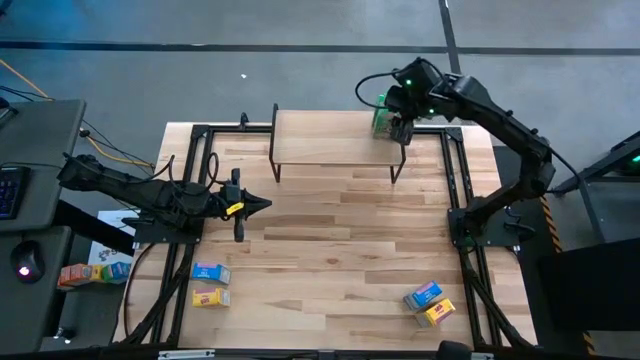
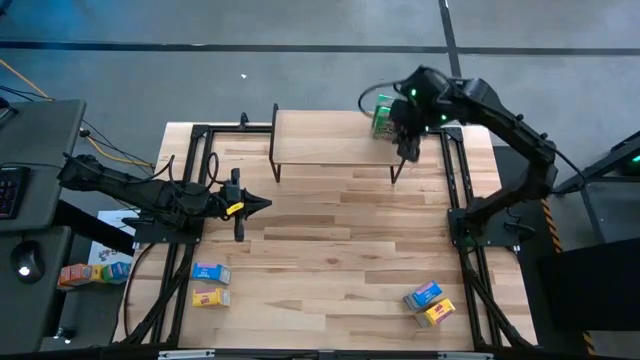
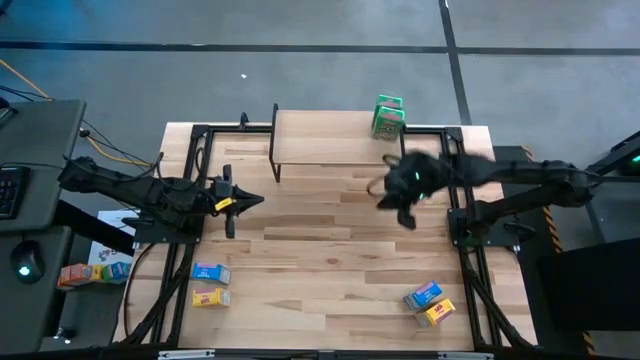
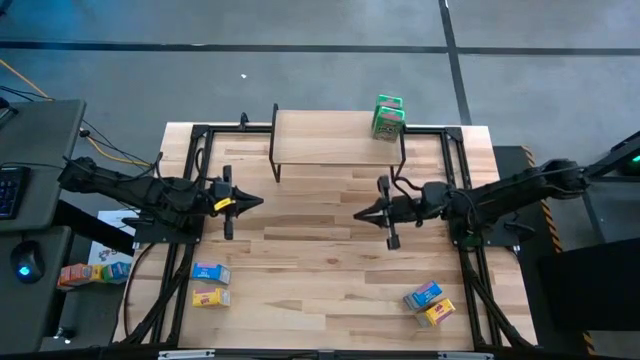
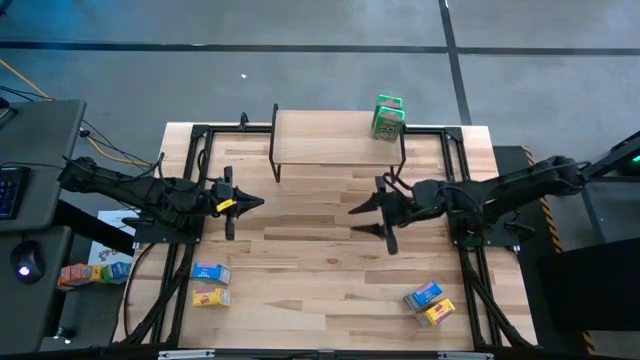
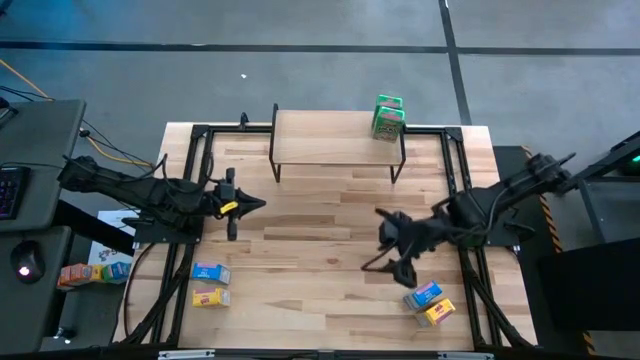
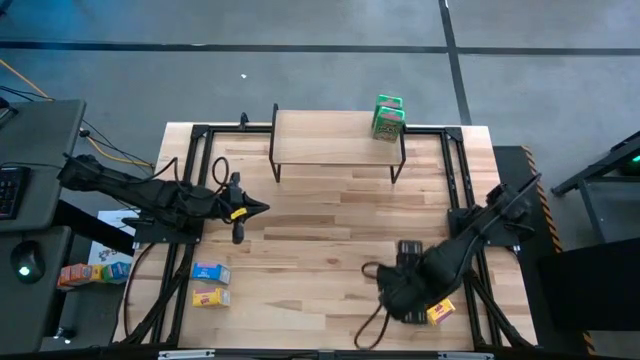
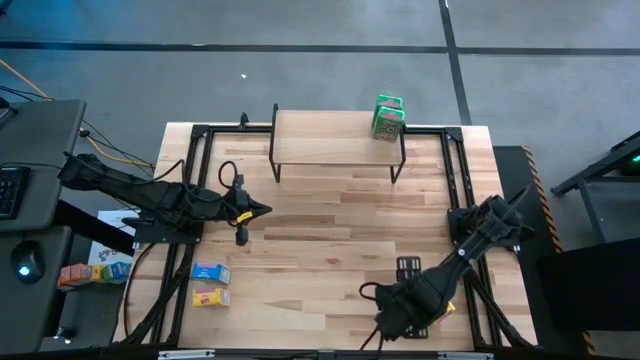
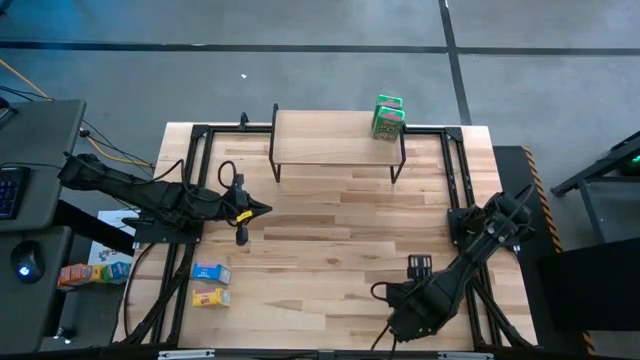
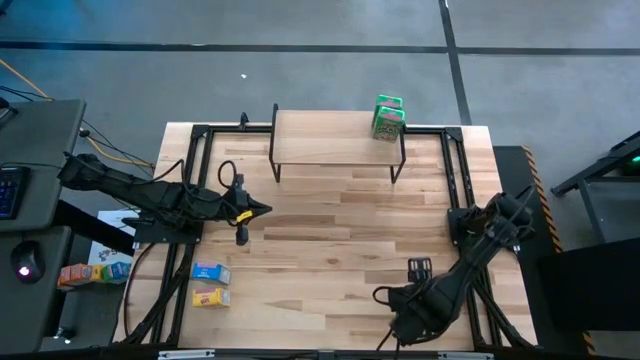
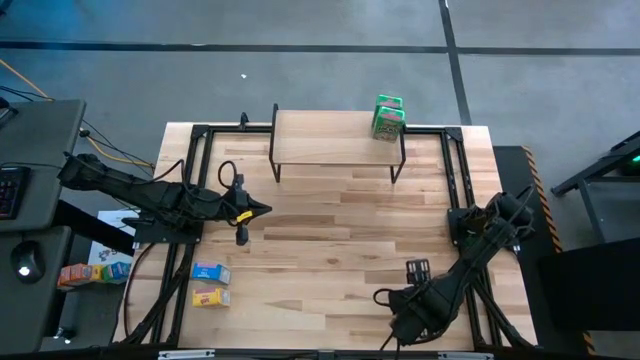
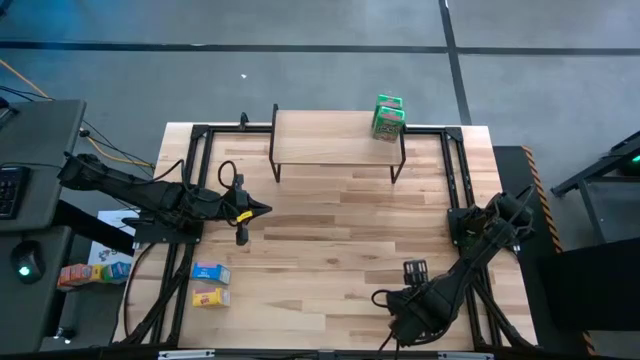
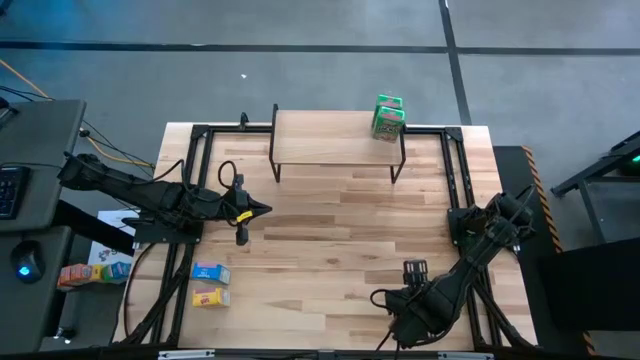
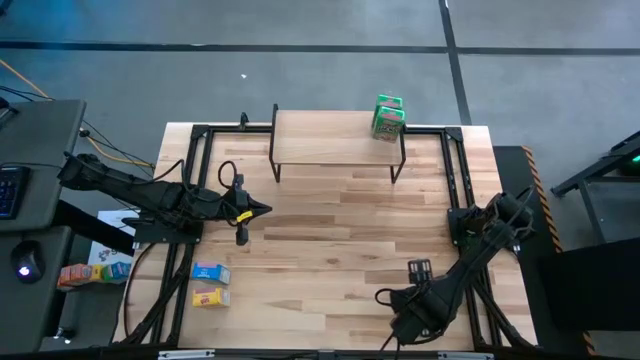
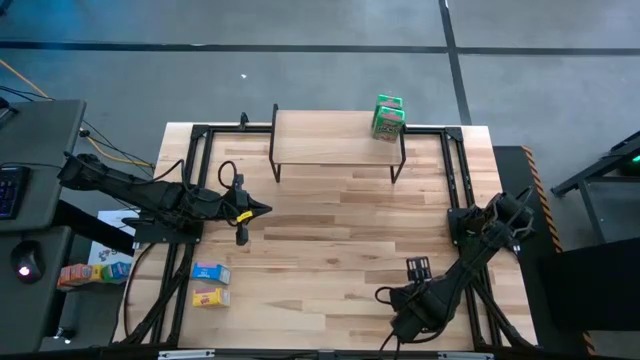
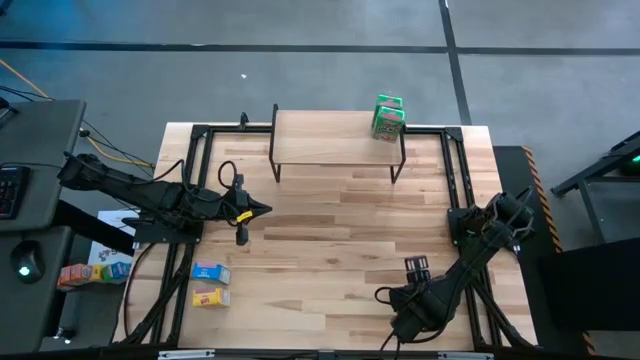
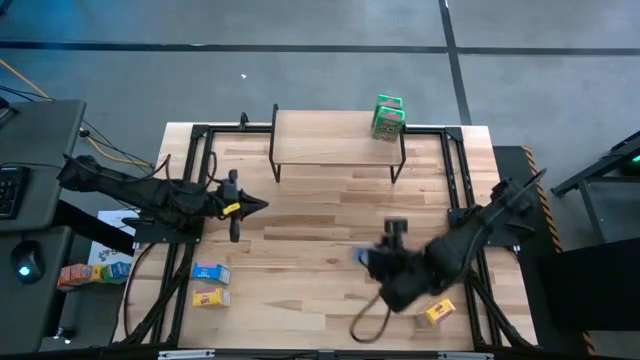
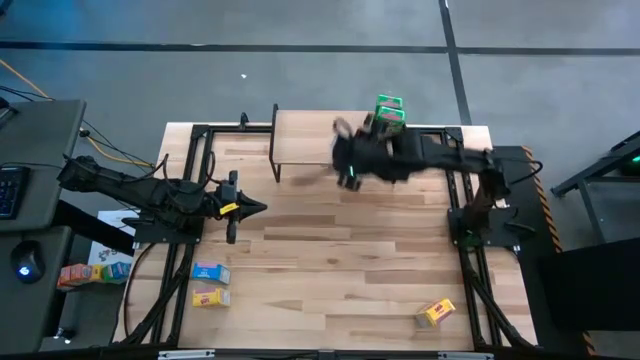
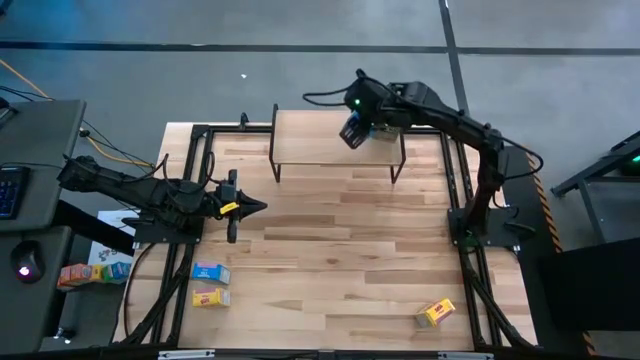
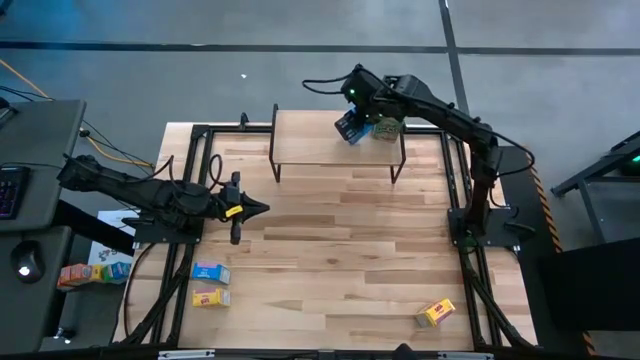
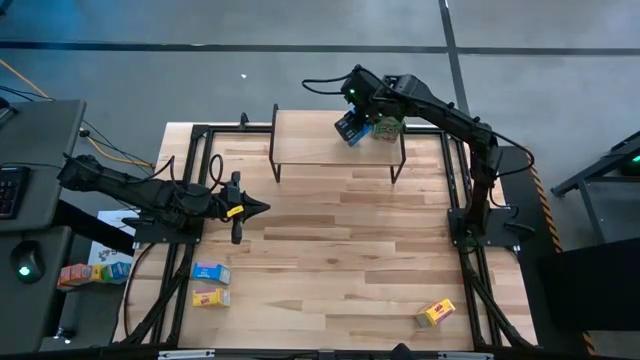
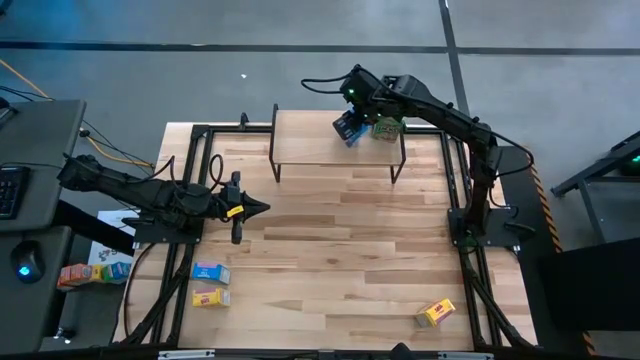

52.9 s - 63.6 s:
Task: Stack cereal on shelf
Put the right blue cereal box on the shelf

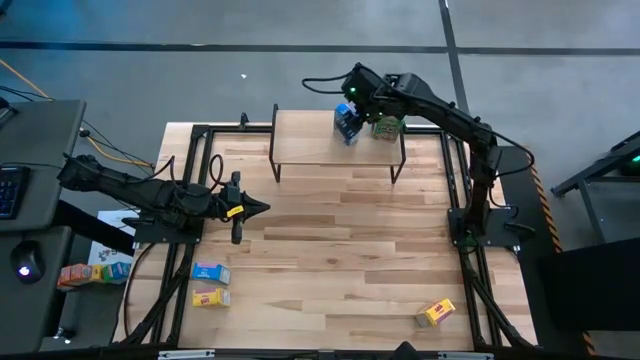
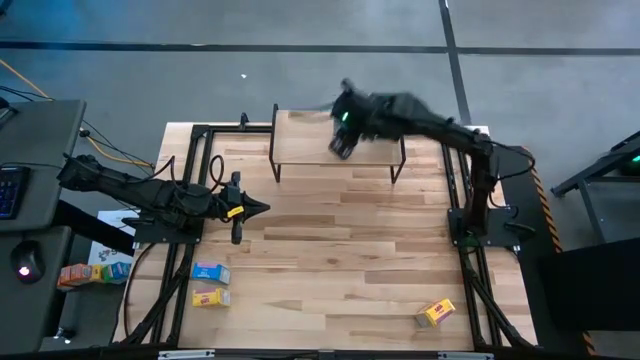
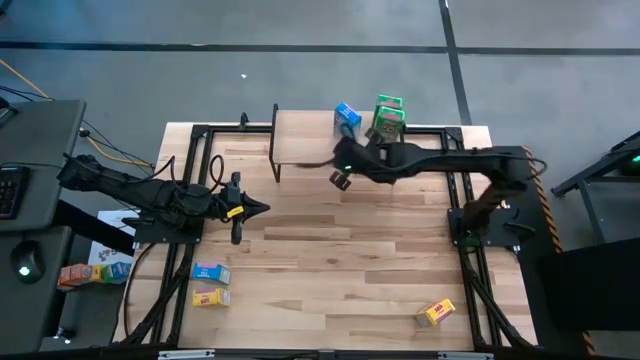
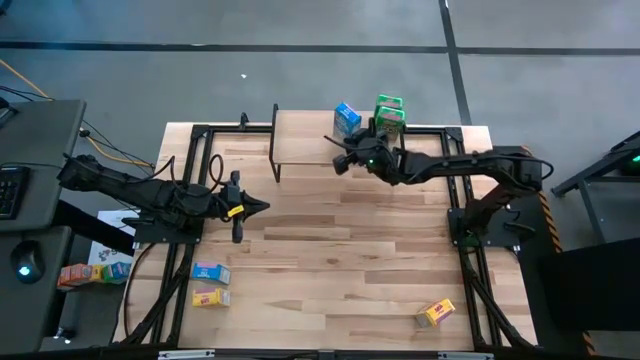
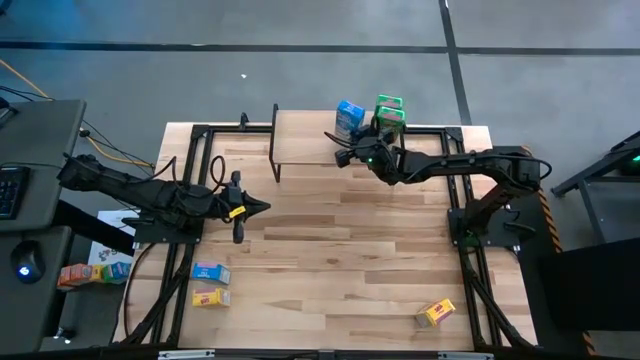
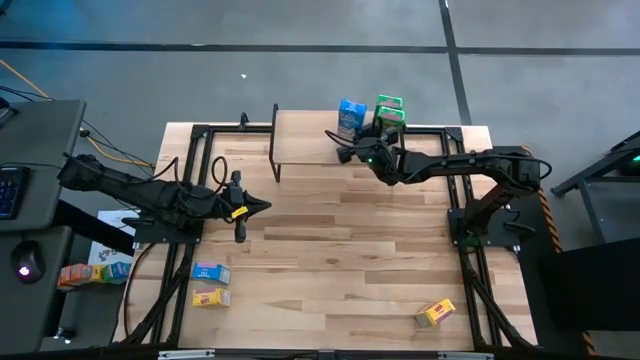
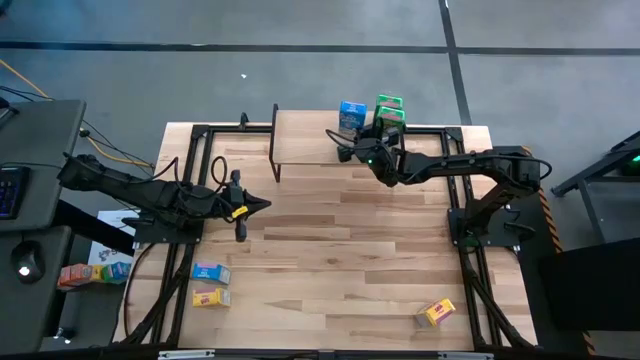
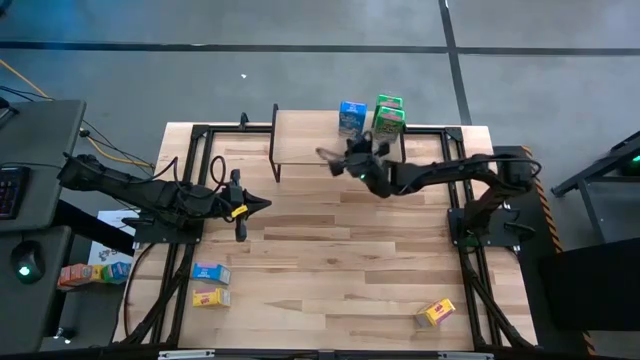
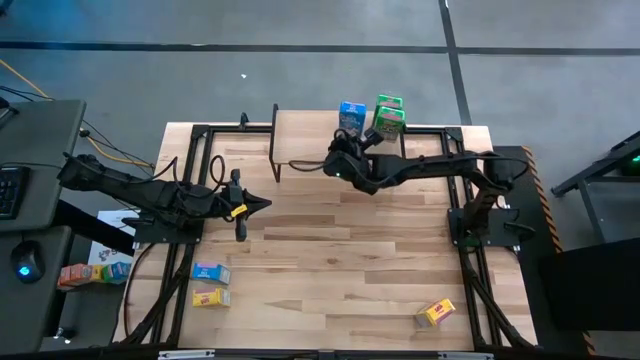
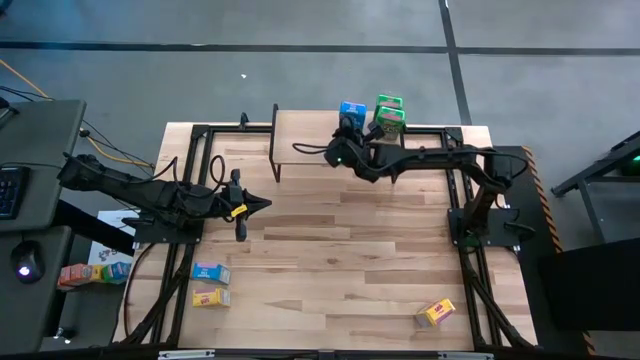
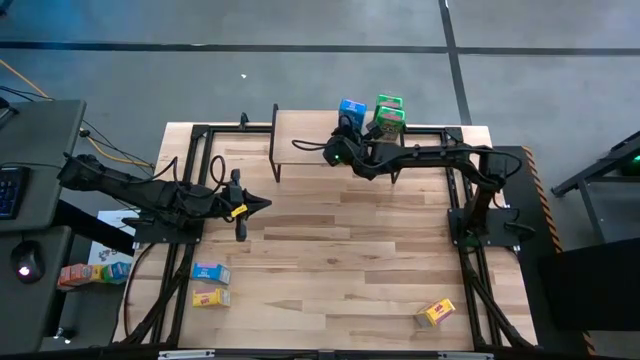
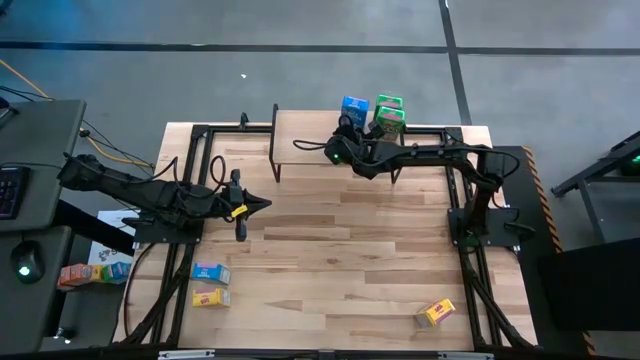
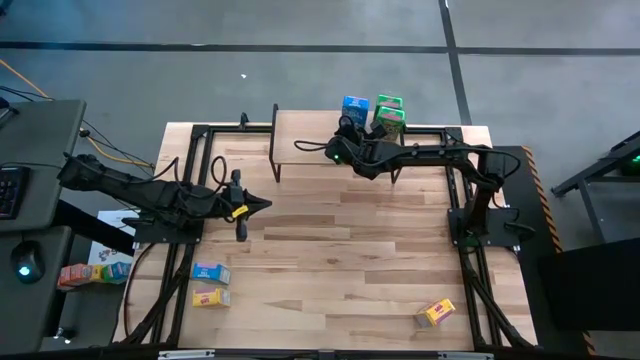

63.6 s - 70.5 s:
Adjust the Blue cereal box to be next to the line of green cereal boxes

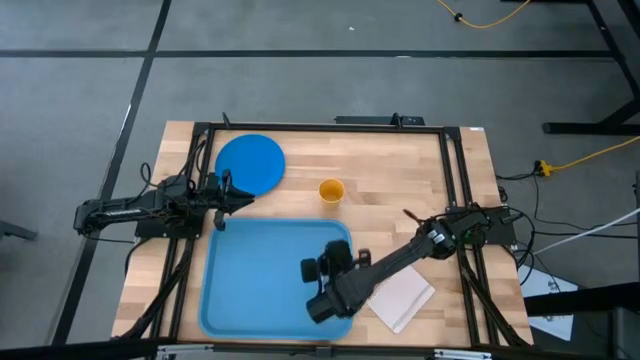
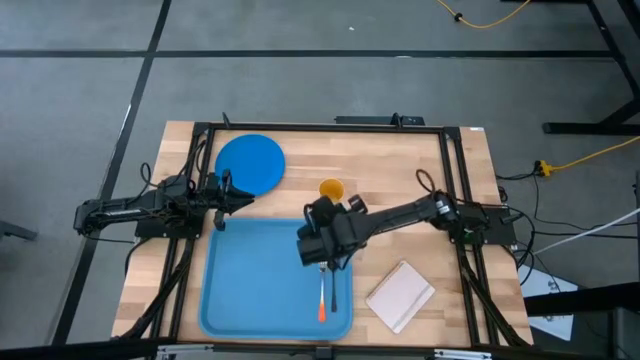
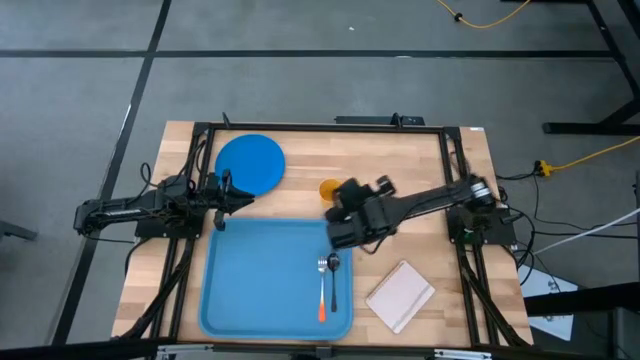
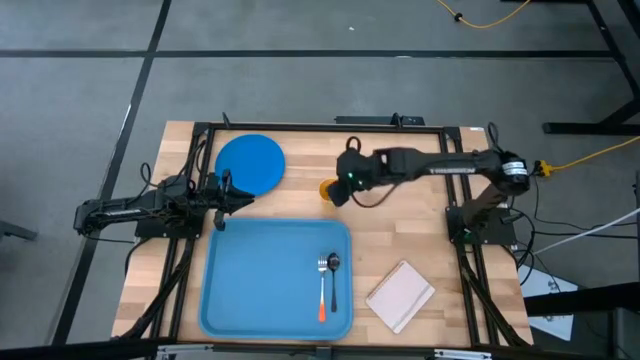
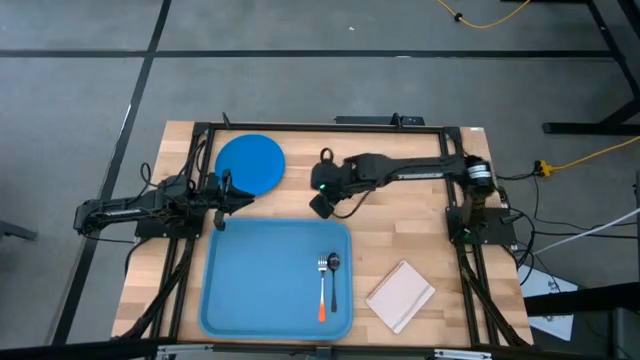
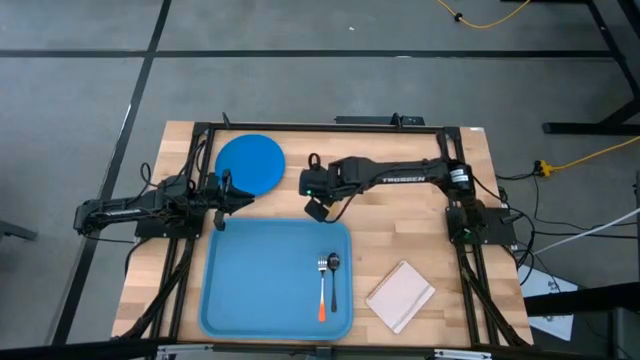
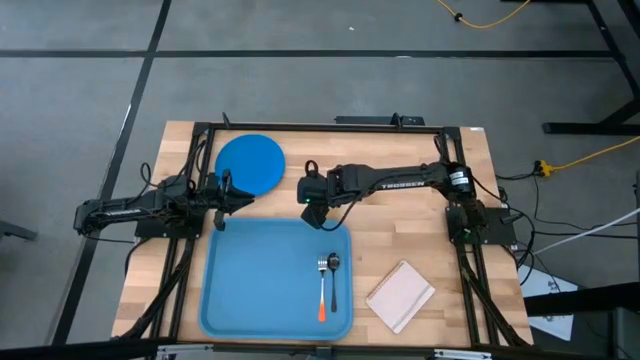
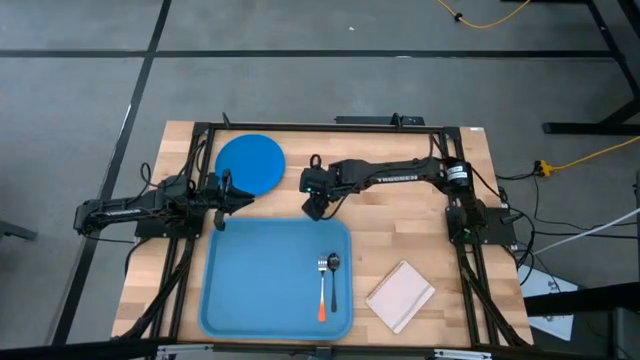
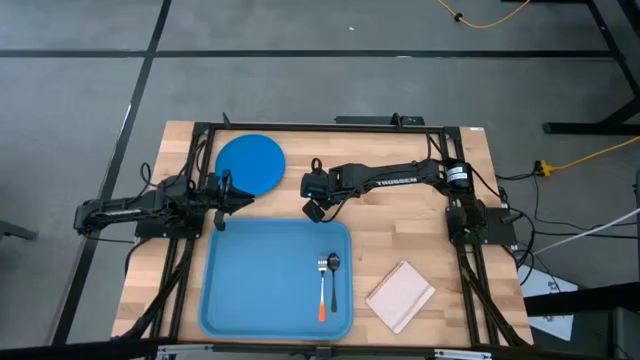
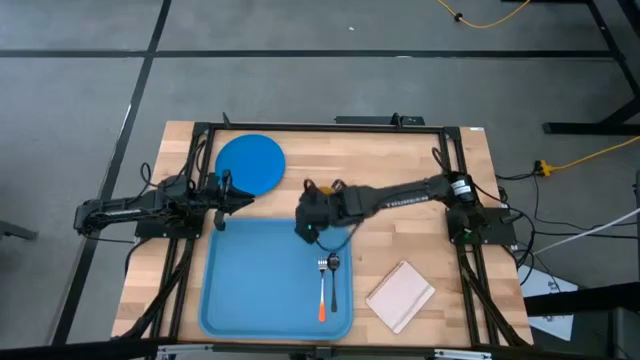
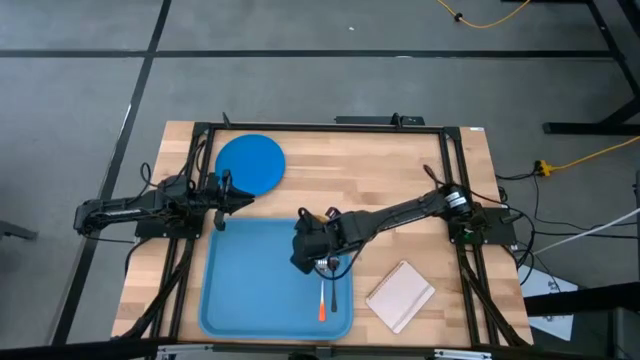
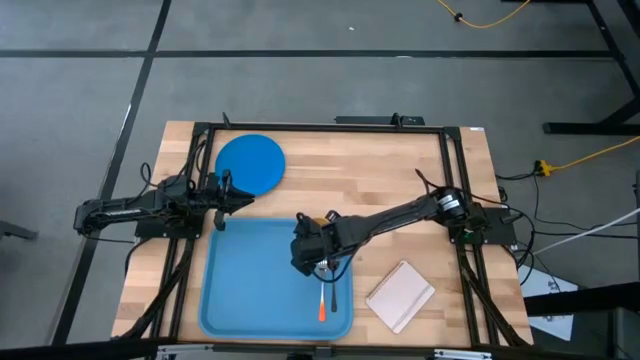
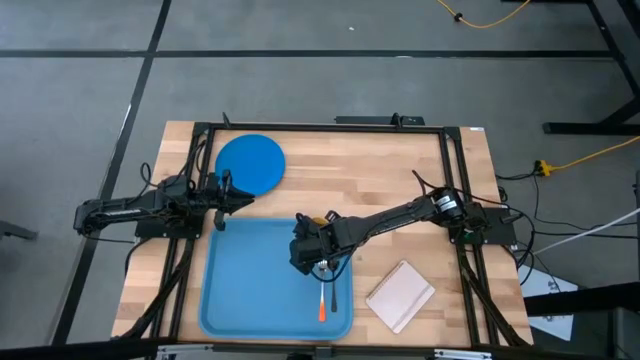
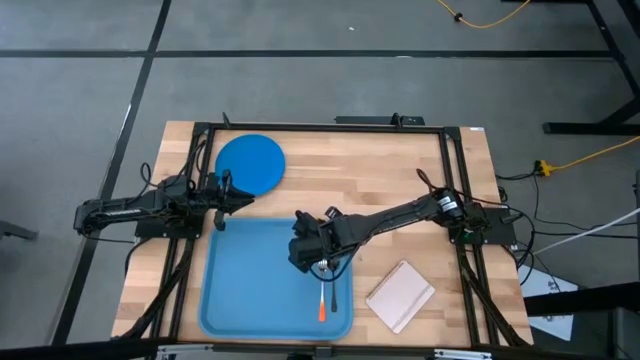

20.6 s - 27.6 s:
Task: Pick and place plate/cup/fork/spoon on tray
Put the yellow cup on the blue tray
